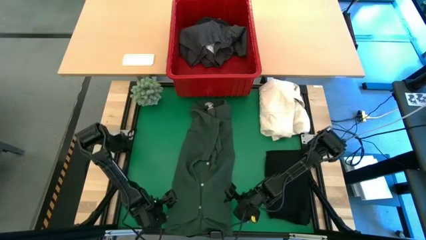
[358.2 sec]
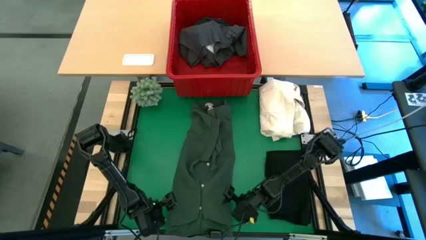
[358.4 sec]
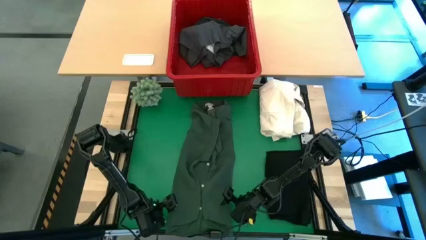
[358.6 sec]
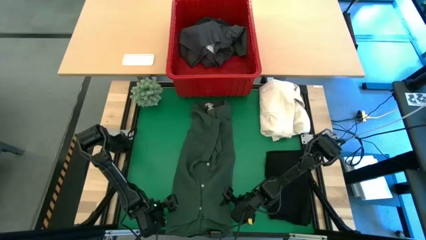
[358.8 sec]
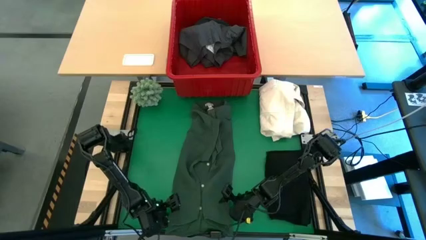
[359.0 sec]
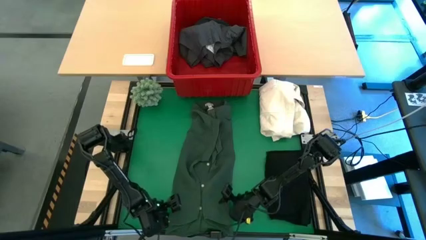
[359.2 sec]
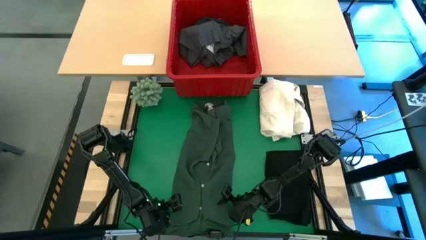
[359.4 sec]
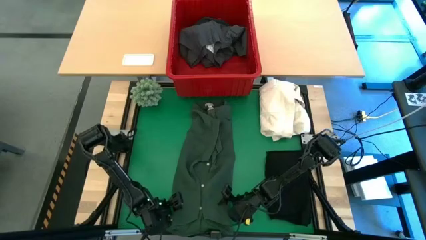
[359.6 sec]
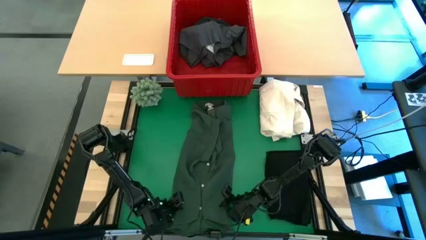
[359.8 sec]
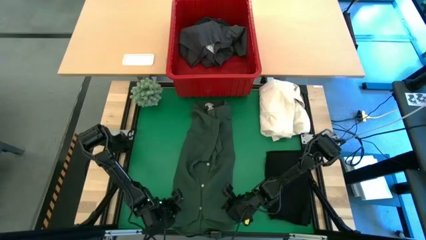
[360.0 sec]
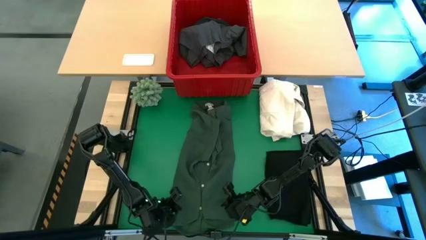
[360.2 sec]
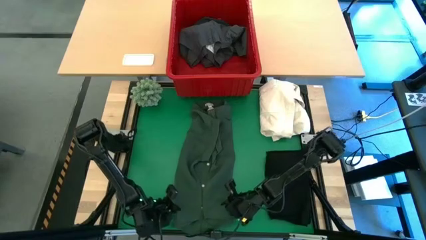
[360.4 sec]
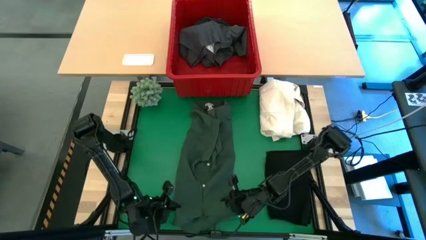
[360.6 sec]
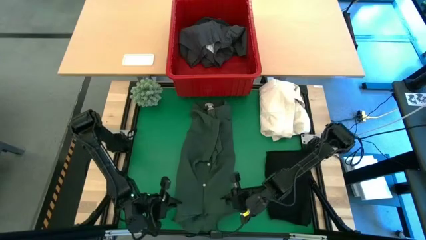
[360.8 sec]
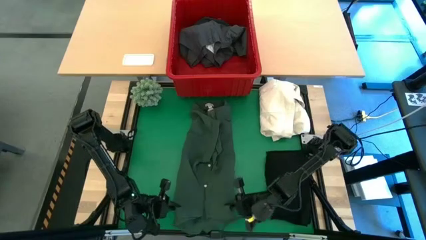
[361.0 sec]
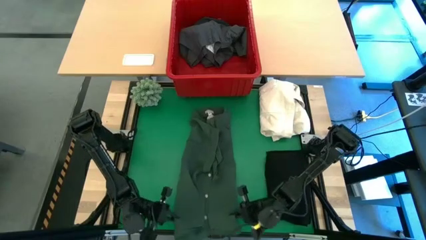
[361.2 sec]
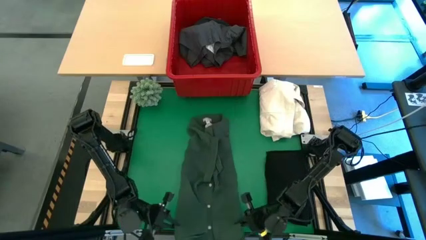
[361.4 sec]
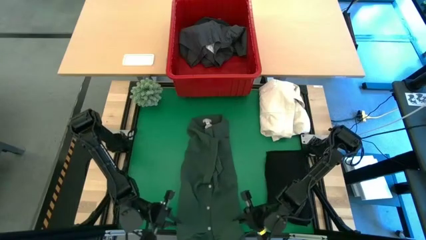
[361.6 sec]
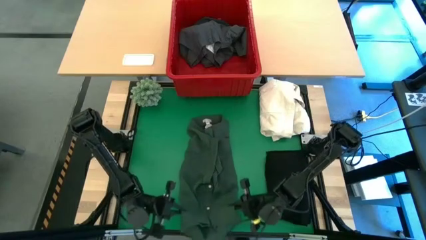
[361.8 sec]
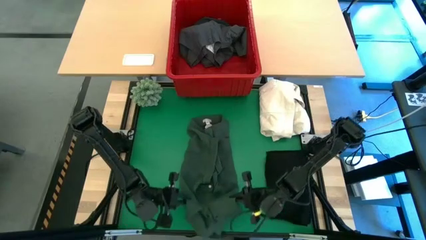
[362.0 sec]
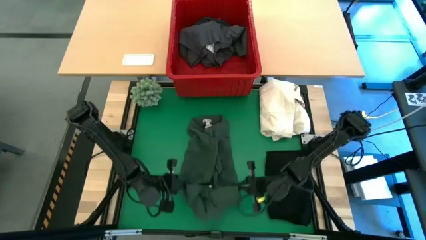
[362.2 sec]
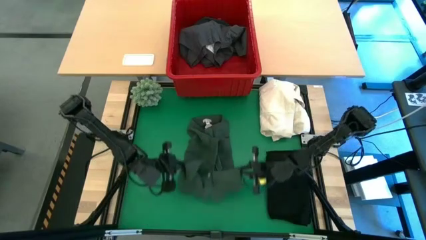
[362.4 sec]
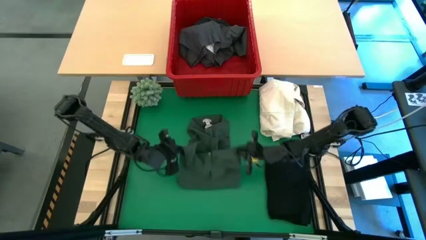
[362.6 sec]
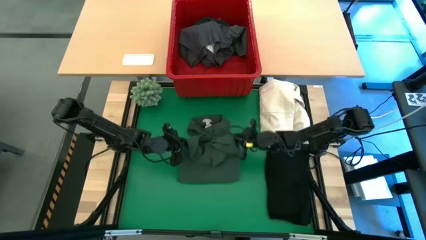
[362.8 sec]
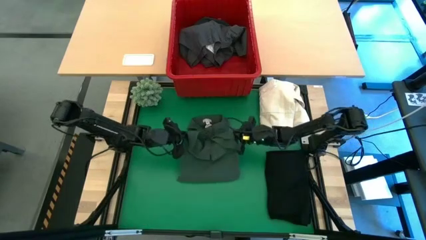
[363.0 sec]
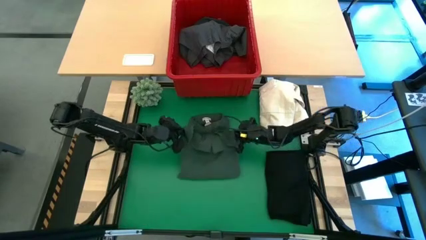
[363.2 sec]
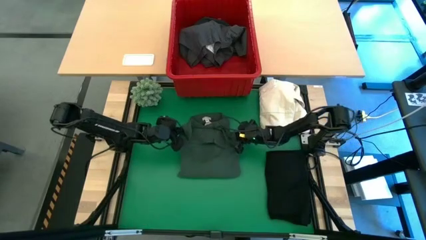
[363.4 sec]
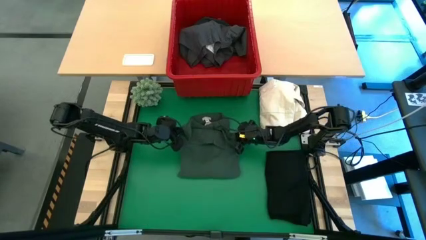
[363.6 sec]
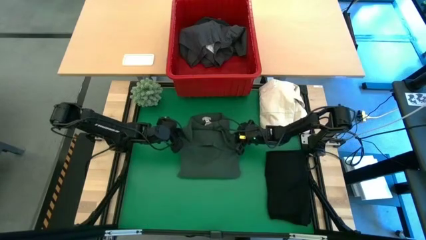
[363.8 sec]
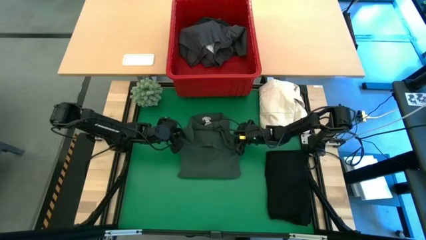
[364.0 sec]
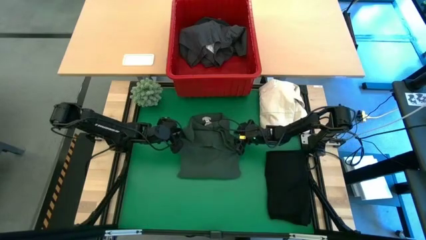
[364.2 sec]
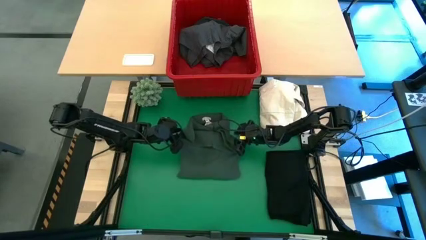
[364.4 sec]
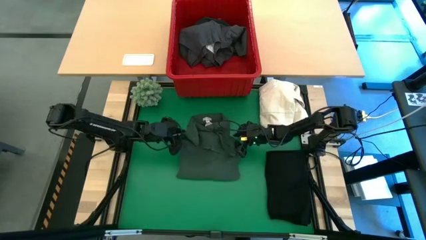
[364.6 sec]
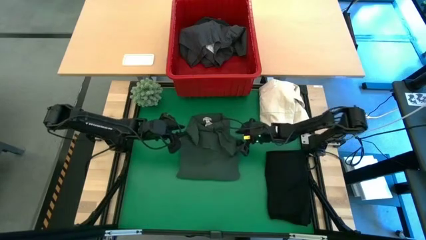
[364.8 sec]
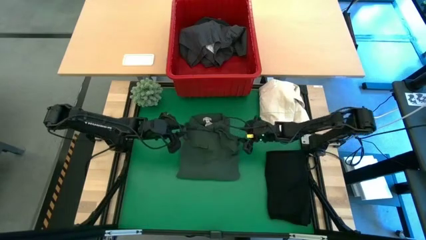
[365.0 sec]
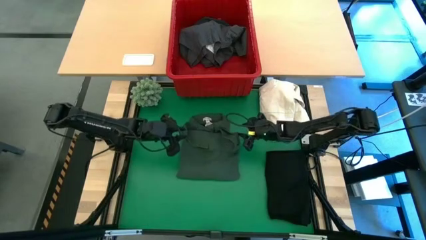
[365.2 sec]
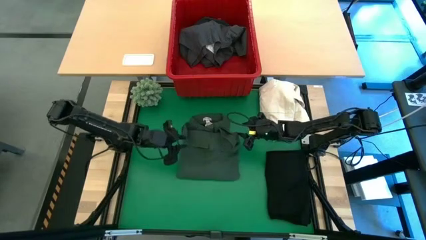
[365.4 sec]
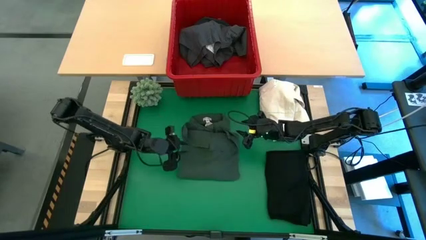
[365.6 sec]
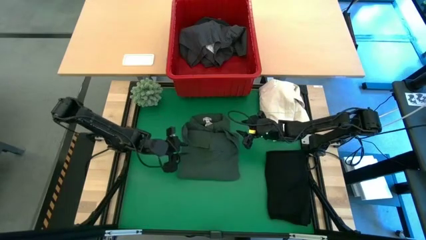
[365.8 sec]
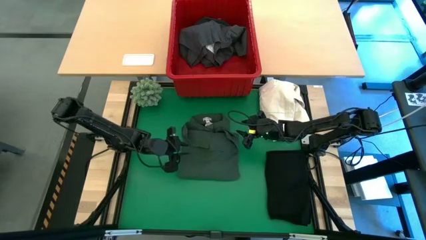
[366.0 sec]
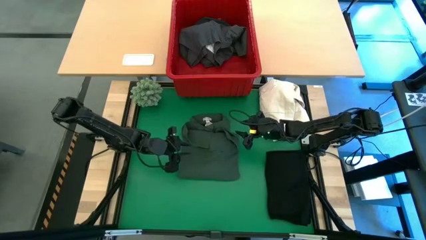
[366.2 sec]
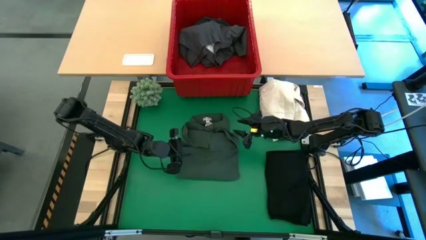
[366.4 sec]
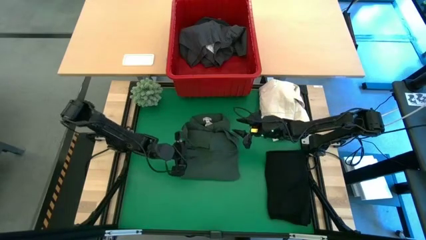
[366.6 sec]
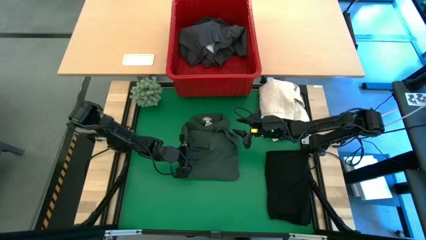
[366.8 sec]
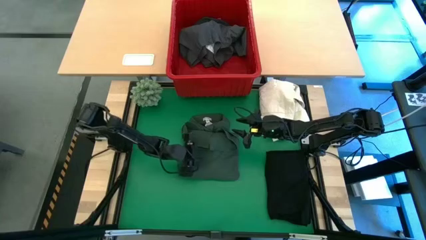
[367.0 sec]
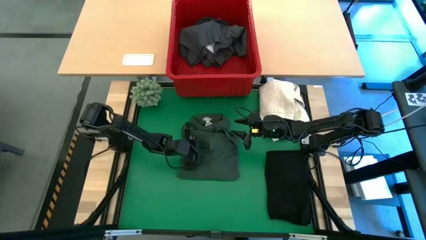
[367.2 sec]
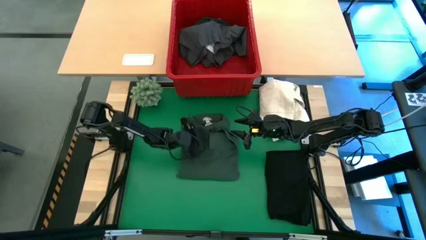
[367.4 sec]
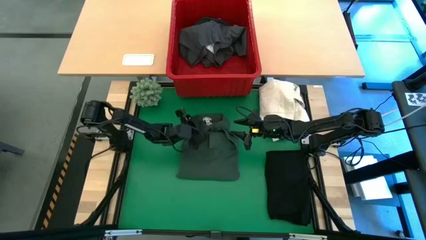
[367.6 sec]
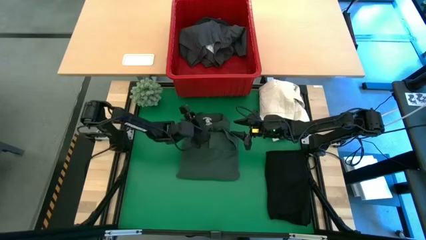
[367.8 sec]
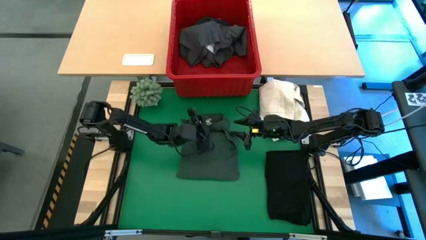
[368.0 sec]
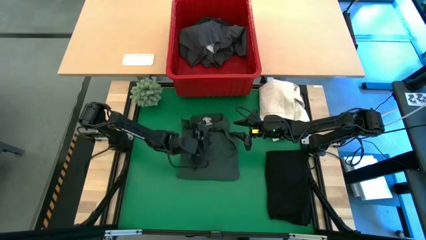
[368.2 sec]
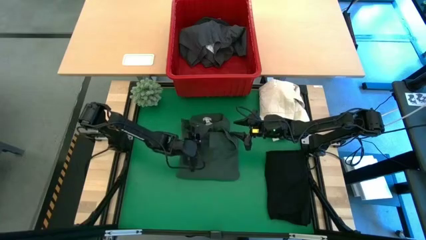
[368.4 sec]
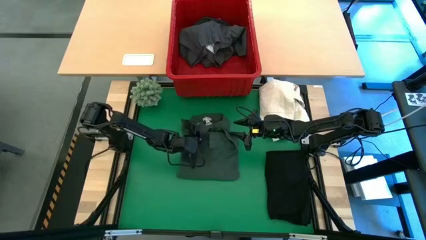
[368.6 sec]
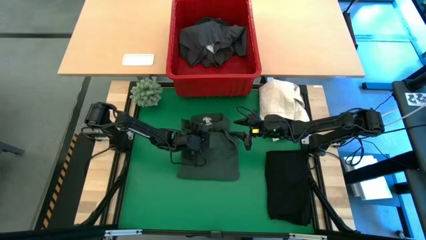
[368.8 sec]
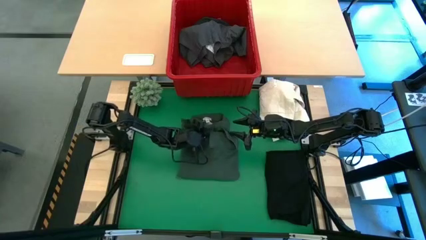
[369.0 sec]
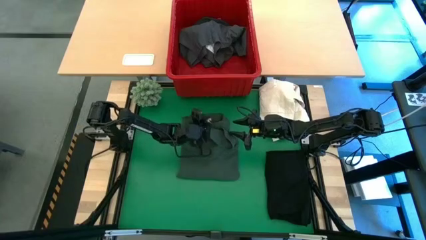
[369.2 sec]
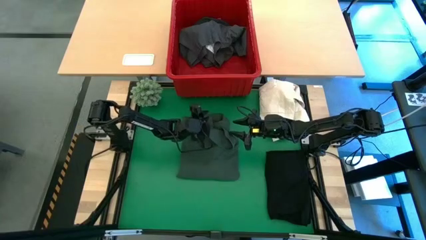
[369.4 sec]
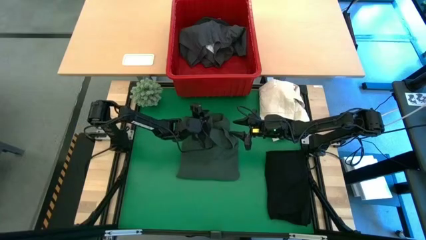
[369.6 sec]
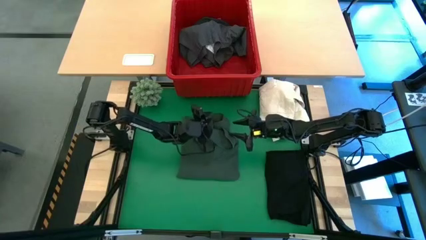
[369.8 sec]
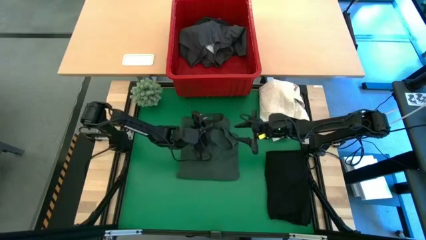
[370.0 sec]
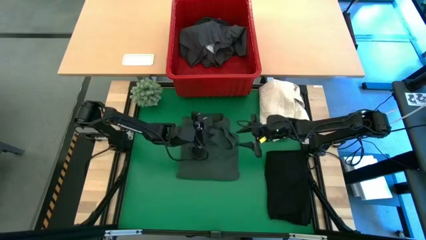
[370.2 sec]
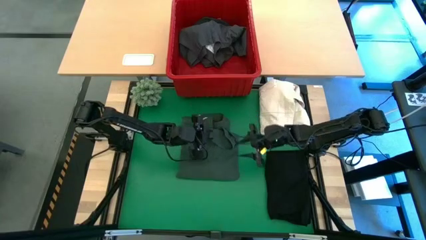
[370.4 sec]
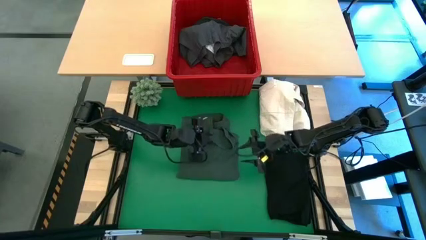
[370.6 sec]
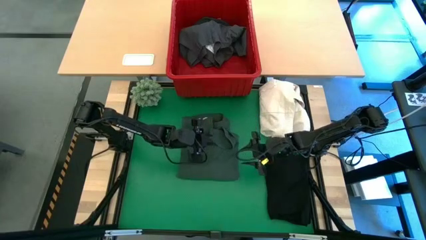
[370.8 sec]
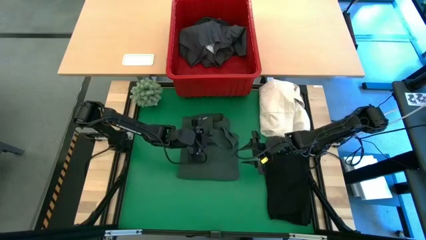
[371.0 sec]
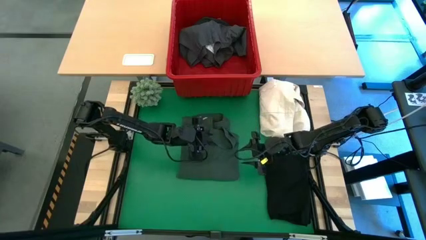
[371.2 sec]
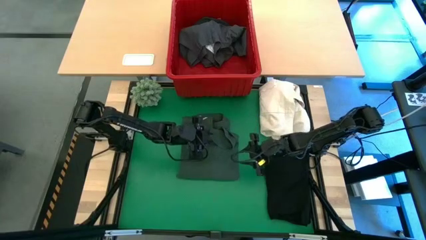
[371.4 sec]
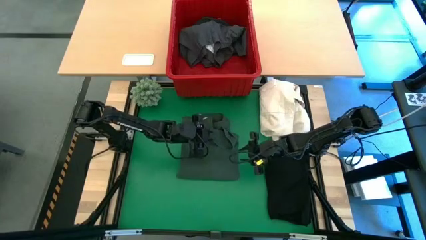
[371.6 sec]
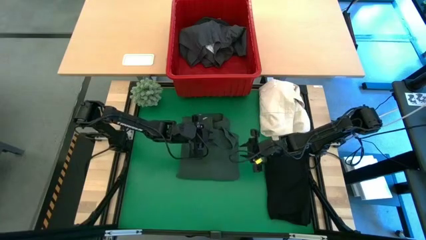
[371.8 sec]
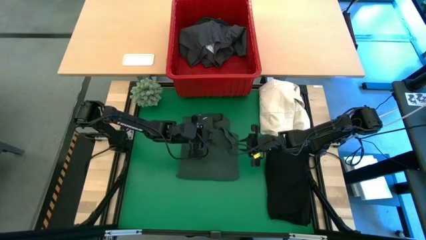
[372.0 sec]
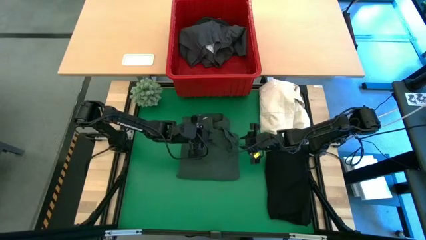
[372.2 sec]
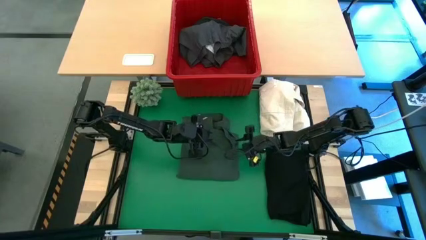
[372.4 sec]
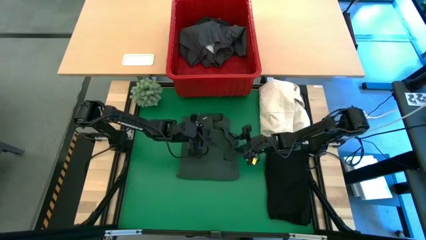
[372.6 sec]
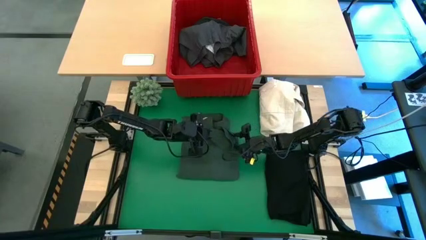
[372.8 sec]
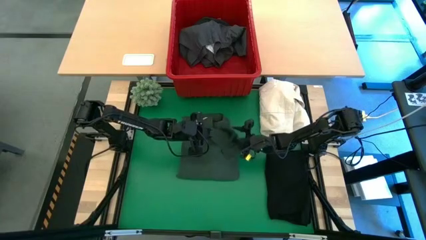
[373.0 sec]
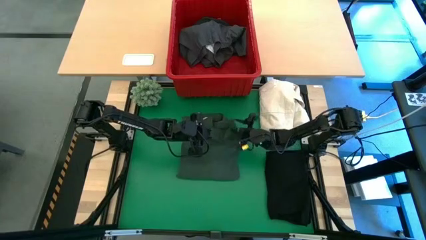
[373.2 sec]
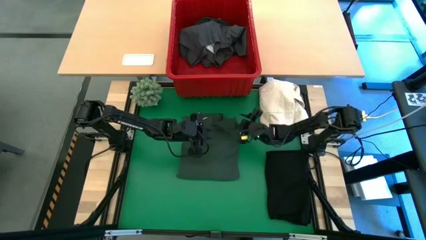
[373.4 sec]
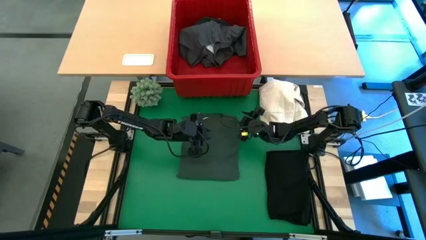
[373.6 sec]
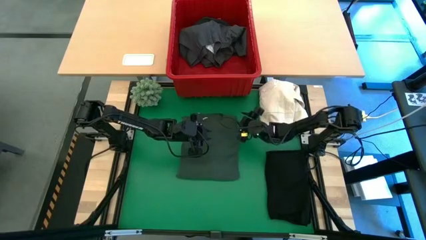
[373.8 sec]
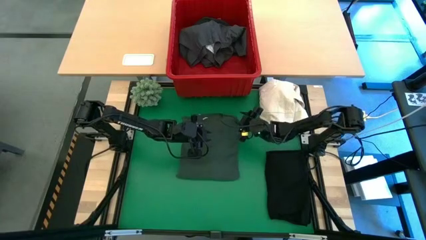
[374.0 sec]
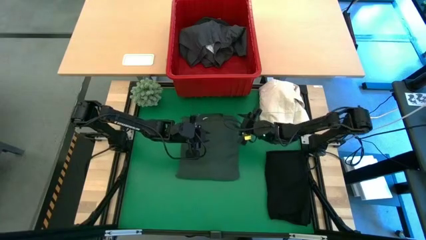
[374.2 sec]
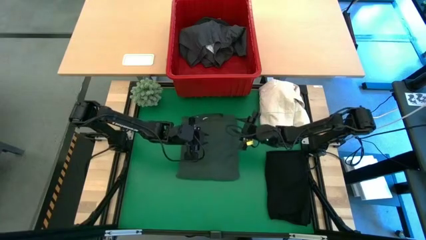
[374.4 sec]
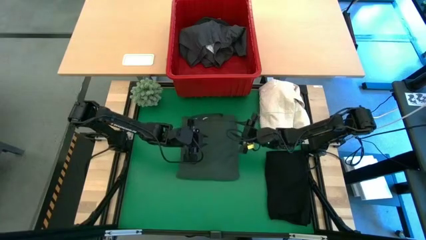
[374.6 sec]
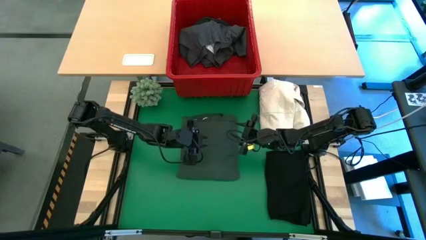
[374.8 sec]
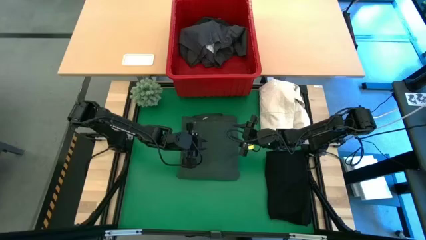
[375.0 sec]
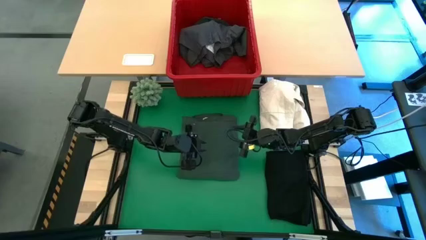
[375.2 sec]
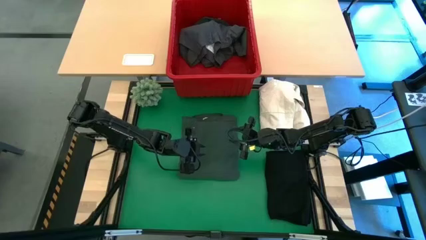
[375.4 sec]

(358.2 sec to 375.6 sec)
Task: Fold laundry
Fold the green polo shirt
